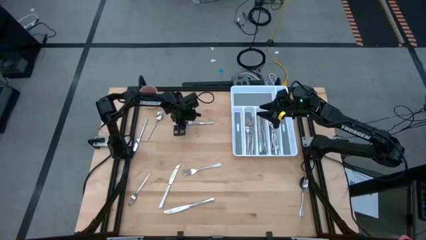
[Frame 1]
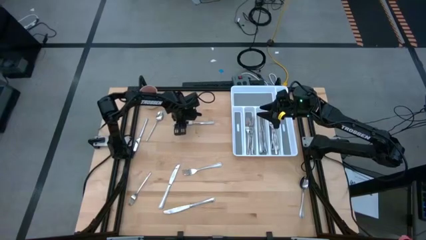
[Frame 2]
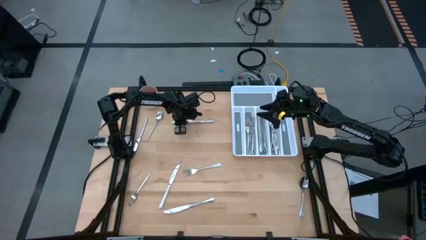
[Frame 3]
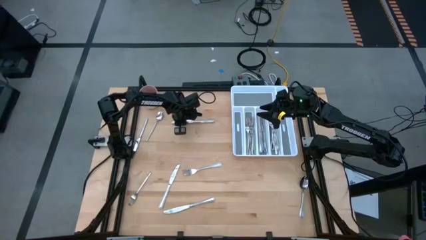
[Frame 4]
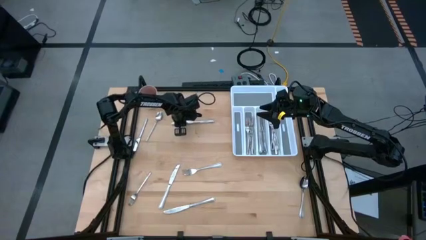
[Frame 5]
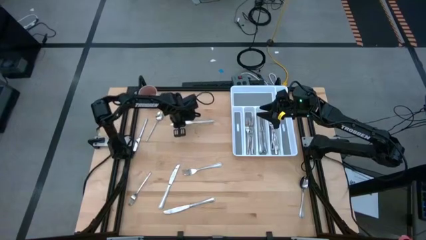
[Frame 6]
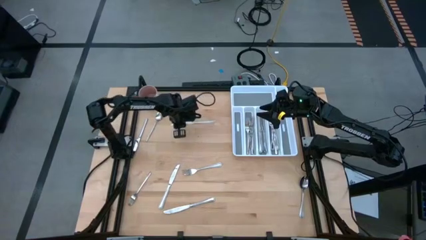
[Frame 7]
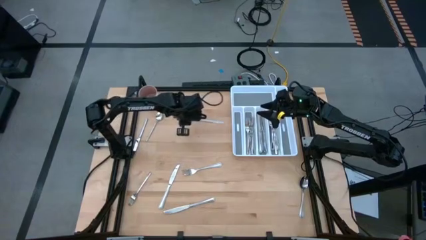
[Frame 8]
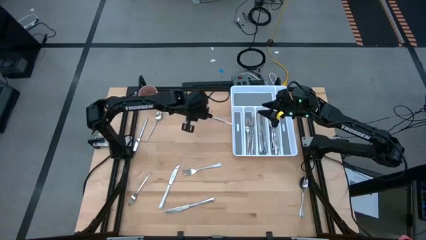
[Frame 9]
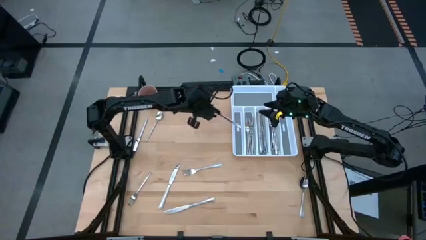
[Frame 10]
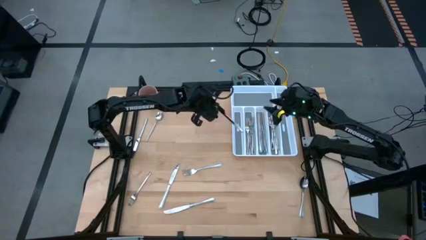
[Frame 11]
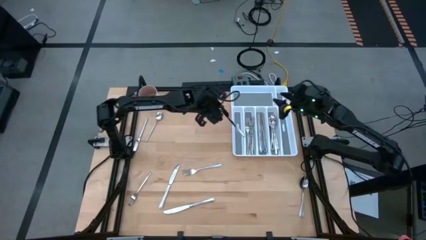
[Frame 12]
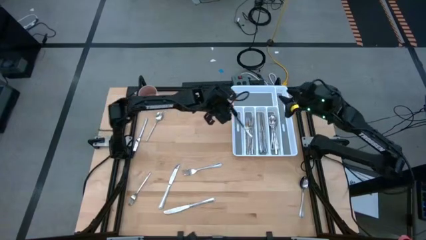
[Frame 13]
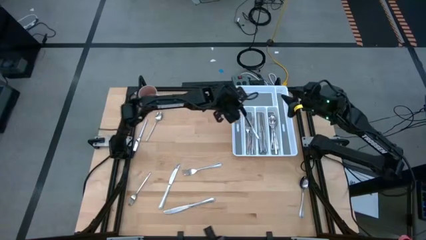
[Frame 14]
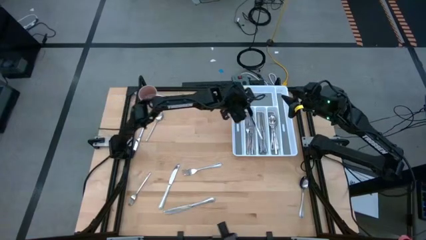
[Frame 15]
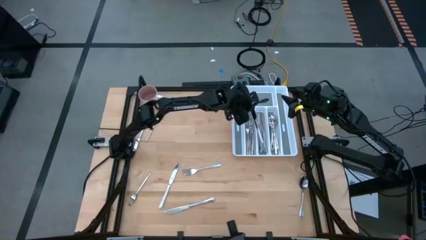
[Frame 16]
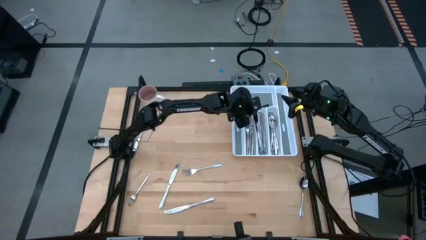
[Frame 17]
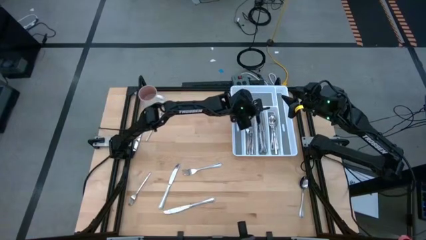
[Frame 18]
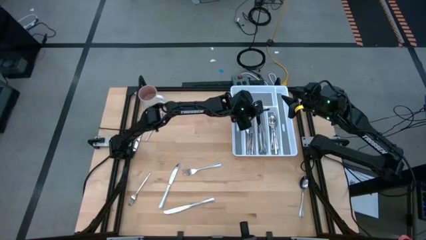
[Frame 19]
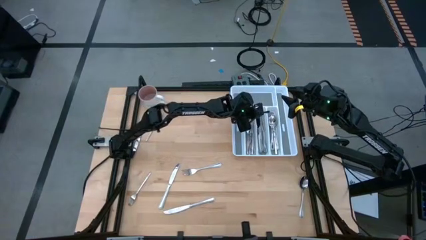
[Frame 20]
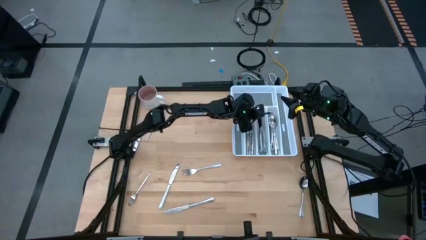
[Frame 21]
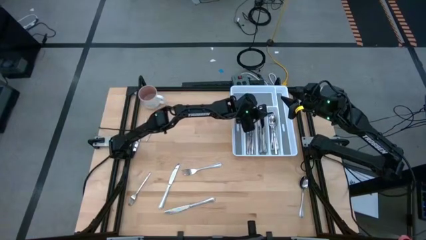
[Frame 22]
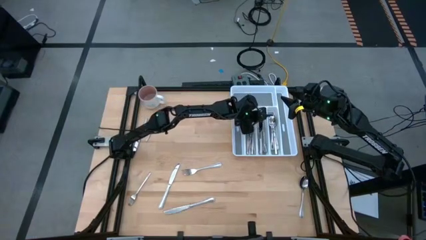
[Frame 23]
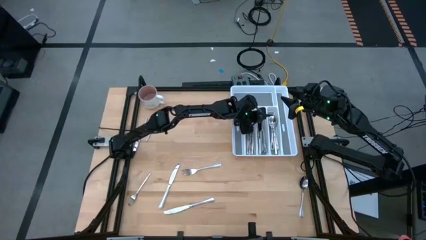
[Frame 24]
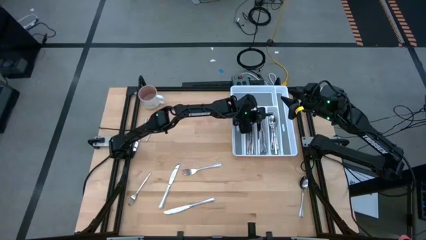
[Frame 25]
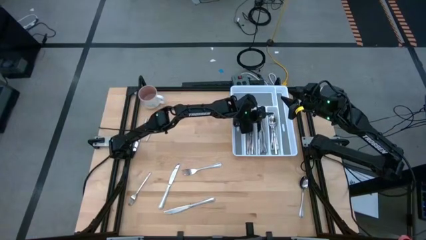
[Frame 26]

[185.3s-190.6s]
Task: Sort silverware
Put the silver table knife into the silverware tray

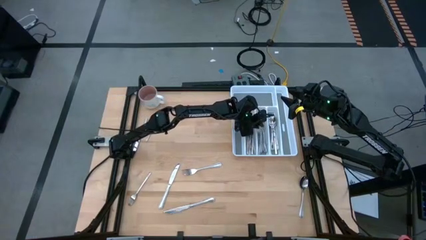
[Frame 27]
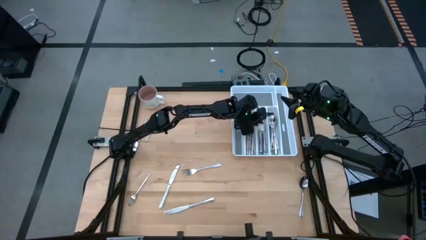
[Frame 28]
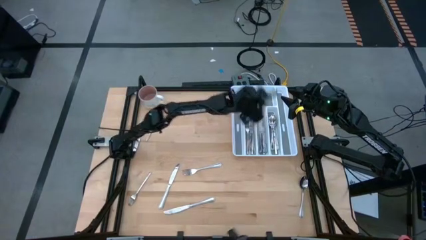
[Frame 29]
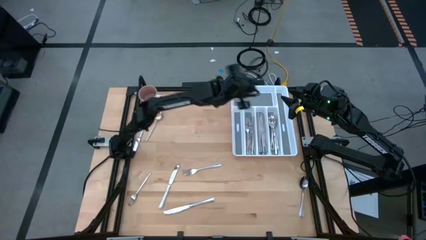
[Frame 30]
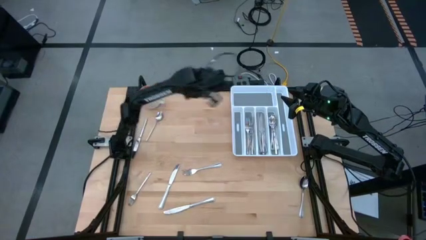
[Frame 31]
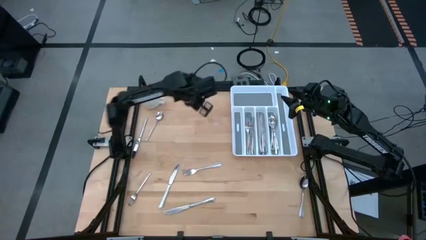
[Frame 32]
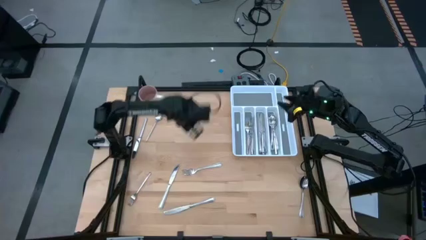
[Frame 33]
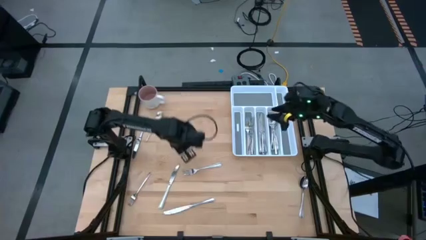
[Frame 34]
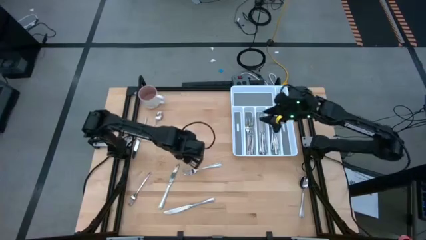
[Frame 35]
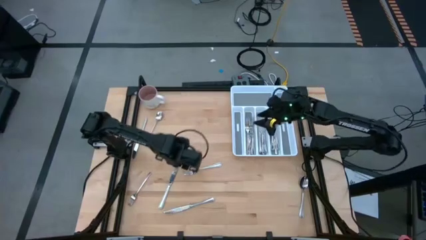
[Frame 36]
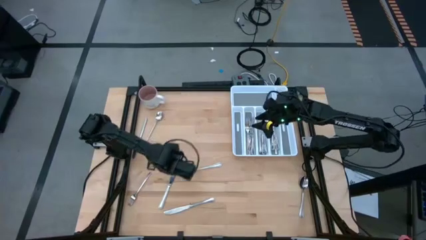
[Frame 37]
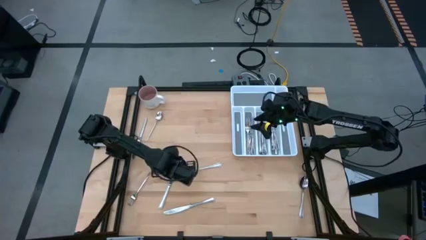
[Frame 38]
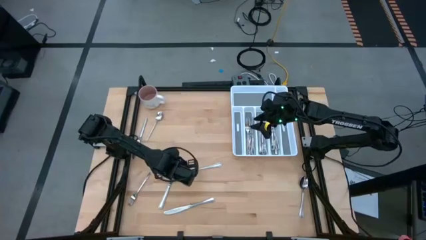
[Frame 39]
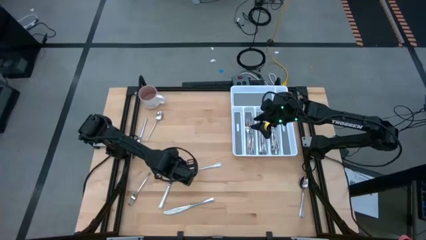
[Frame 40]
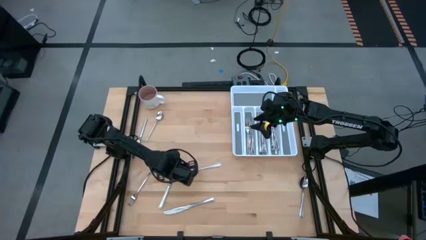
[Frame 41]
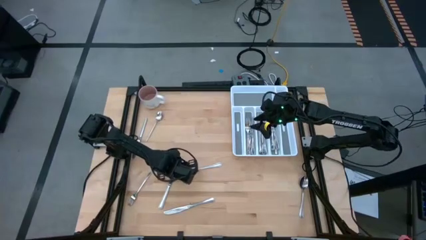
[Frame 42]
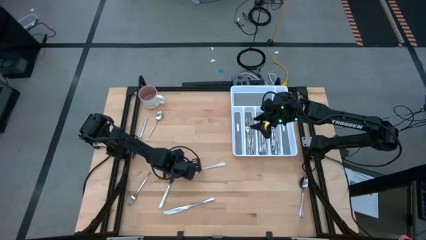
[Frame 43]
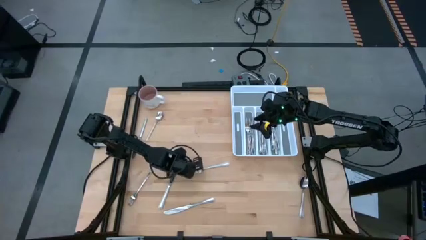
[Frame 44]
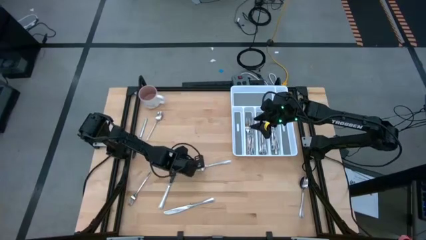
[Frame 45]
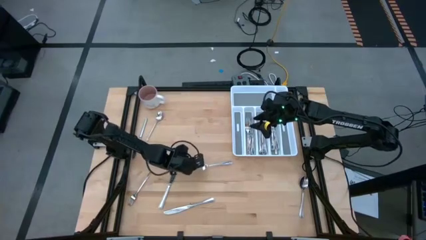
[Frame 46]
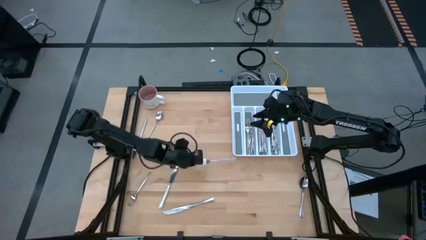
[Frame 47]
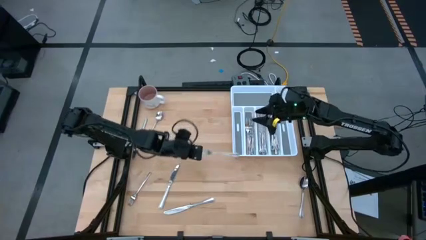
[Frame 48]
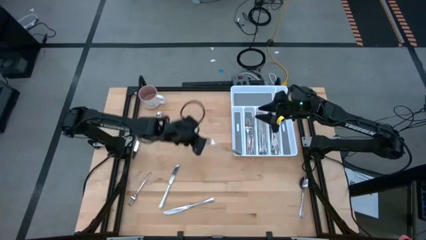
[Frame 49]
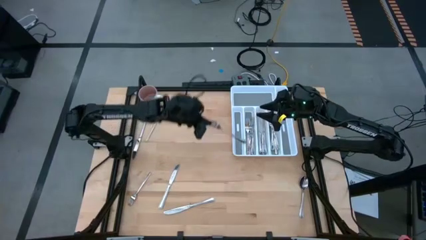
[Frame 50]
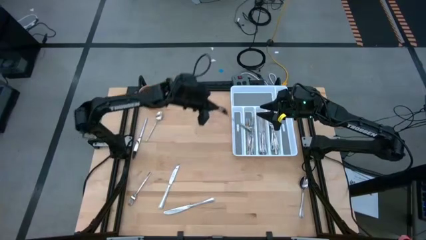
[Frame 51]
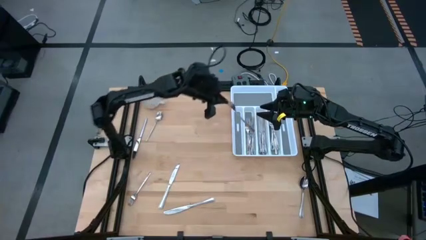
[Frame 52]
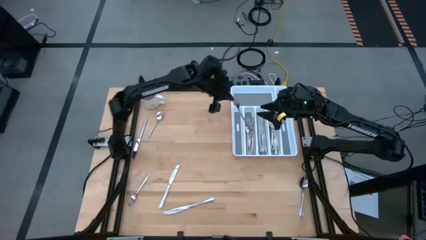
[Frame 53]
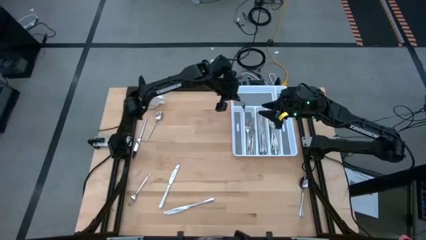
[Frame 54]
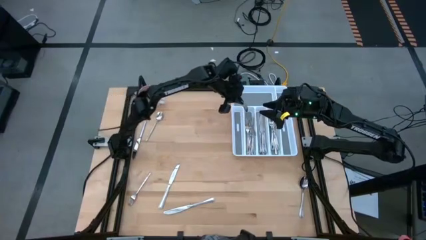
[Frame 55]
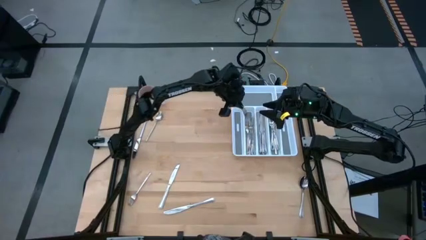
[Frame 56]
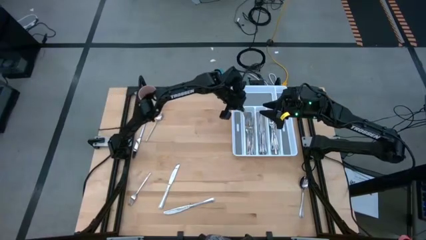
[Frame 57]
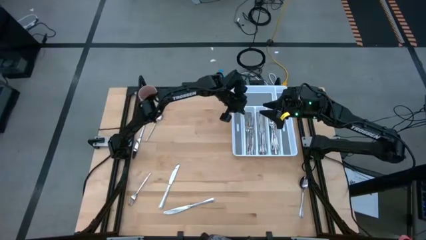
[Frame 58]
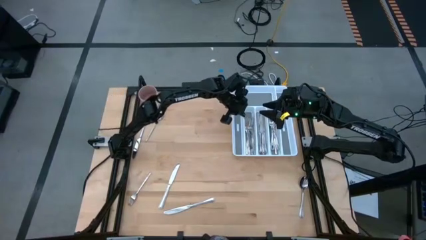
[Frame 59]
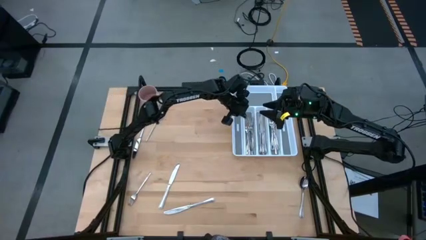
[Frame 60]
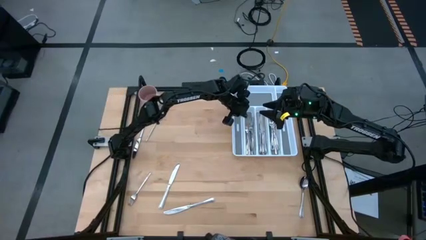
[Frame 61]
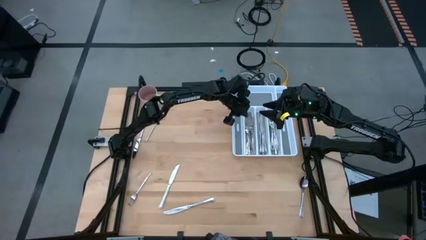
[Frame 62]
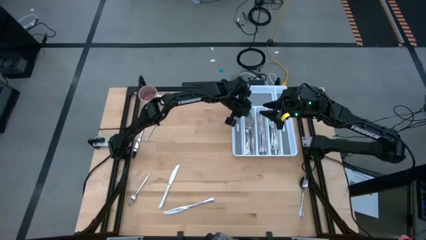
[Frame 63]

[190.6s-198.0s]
Put the silver fork into the silverware tray

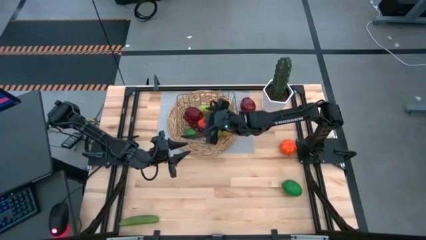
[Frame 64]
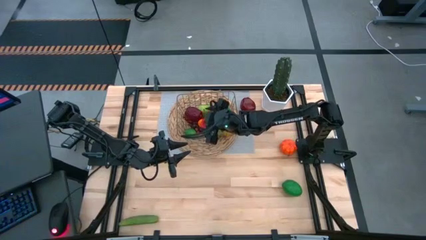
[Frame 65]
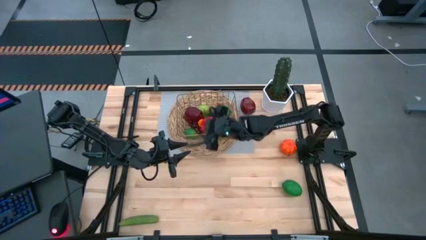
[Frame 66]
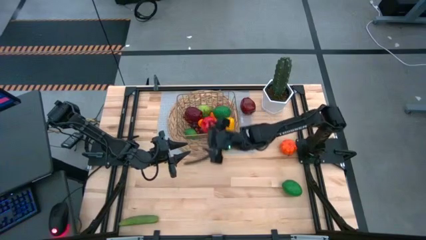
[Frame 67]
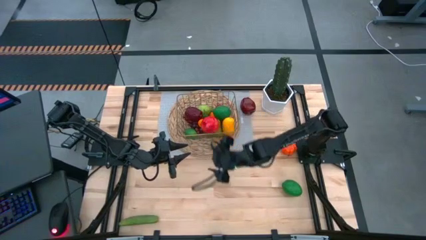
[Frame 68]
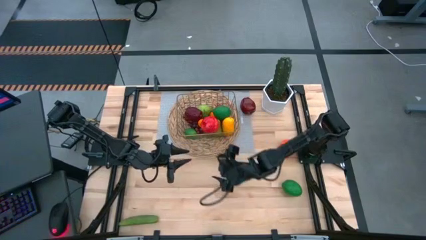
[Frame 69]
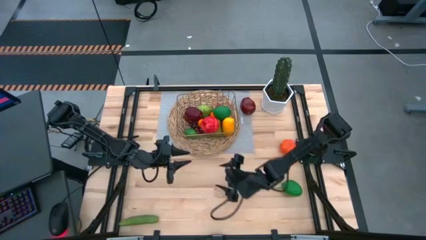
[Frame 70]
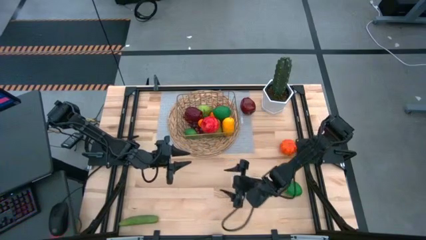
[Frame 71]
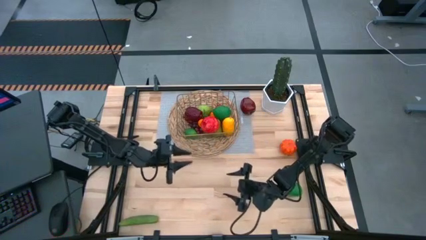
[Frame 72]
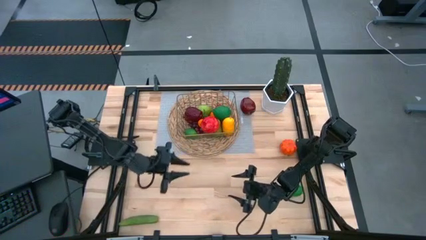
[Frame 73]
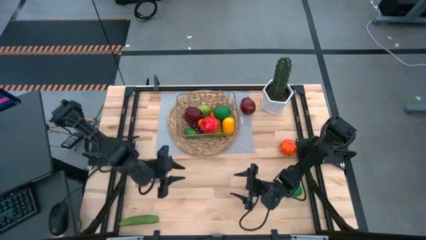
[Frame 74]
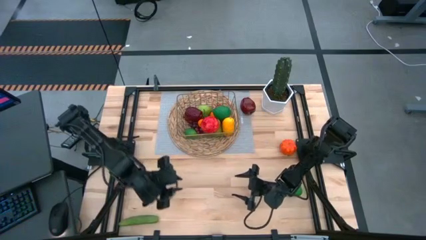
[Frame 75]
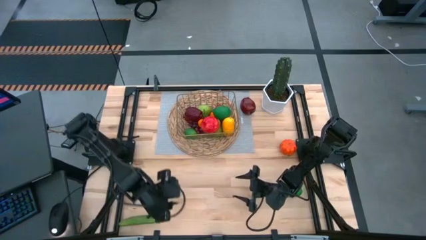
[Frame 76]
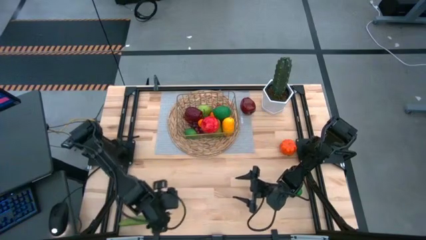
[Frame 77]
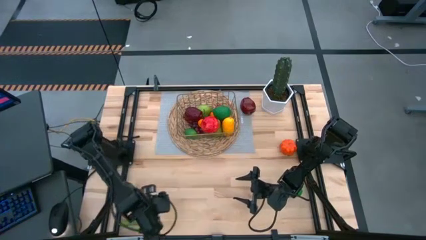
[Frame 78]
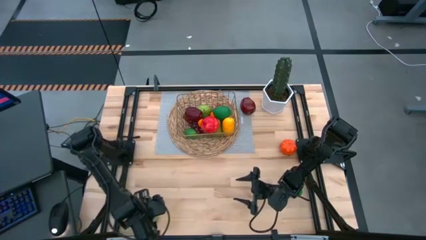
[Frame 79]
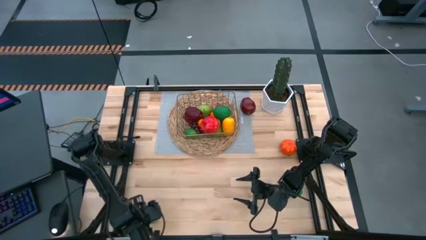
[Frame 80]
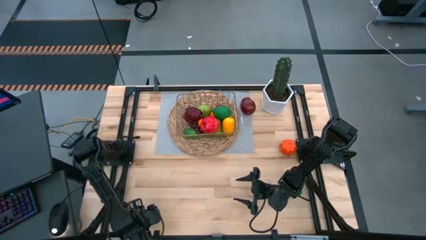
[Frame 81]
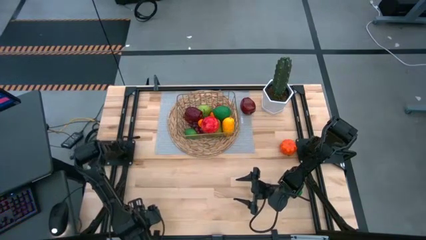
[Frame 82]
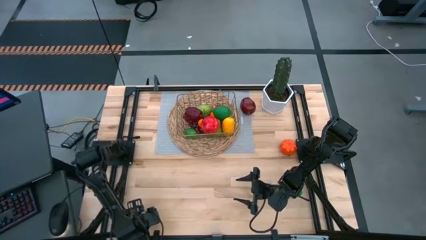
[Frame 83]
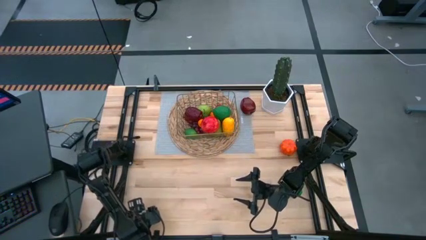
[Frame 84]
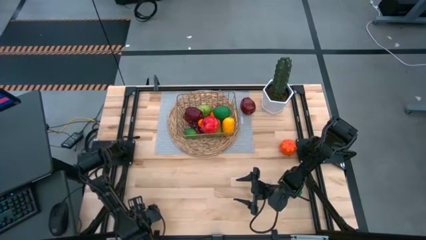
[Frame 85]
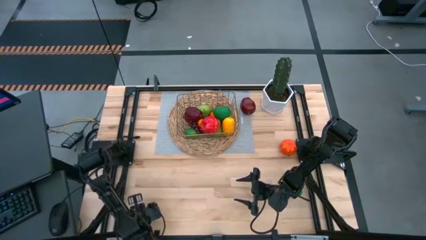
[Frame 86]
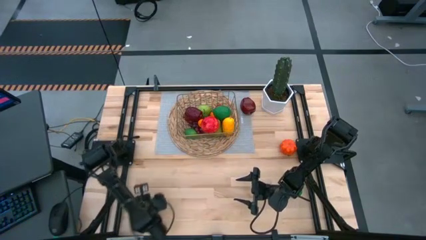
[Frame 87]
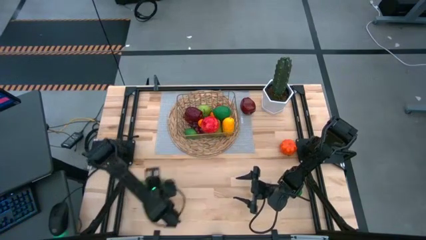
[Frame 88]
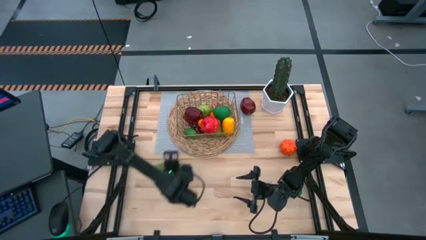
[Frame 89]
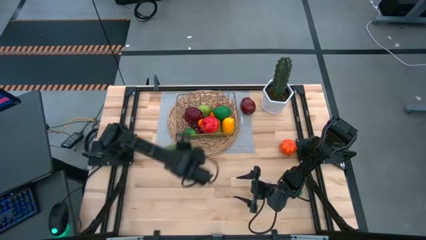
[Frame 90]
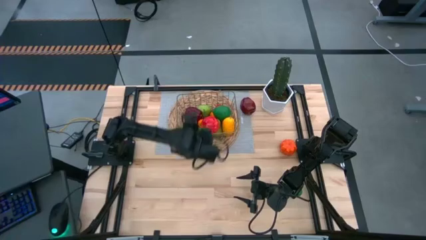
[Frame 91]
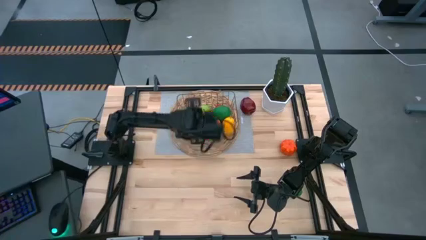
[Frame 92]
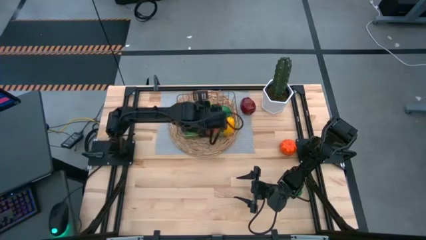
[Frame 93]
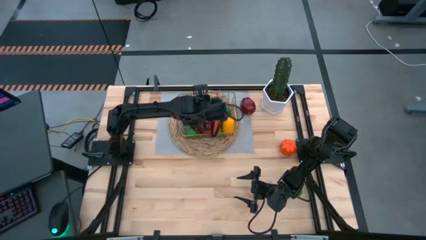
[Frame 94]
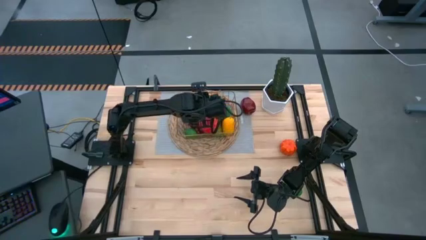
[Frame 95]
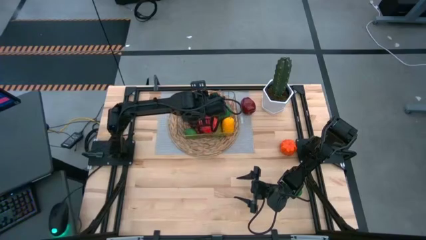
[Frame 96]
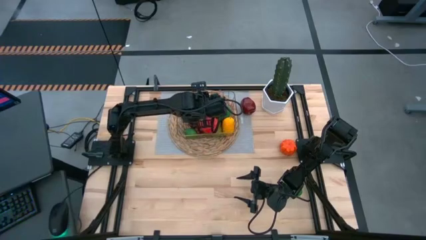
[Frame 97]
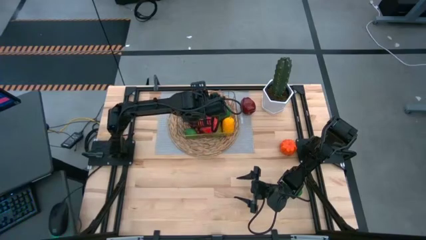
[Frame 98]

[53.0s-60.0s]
Task: Build produce basket
Put the green cucumber into the gold wire basket
